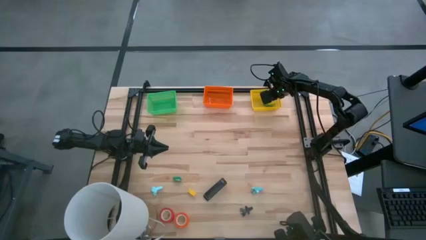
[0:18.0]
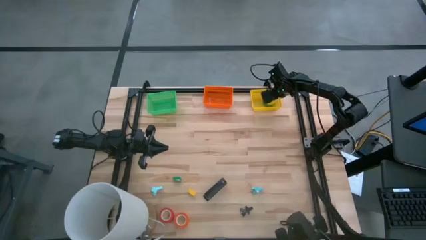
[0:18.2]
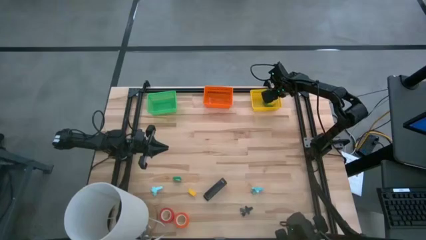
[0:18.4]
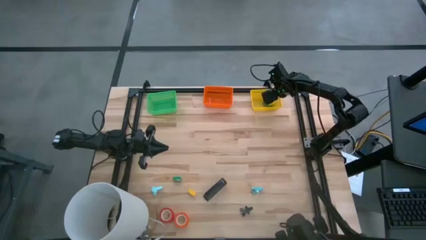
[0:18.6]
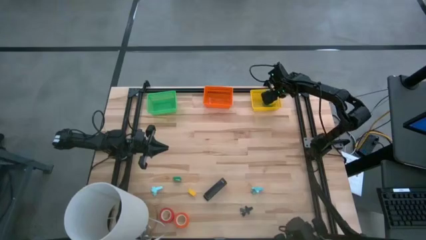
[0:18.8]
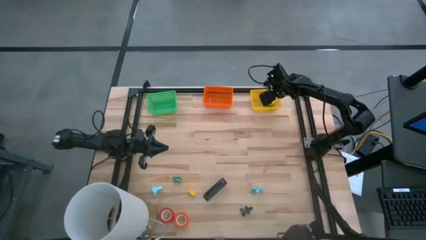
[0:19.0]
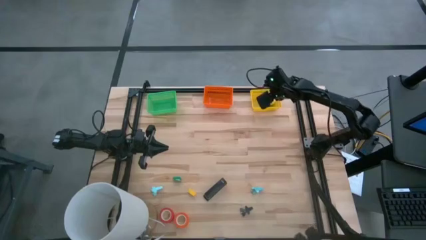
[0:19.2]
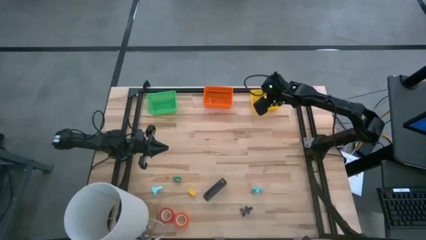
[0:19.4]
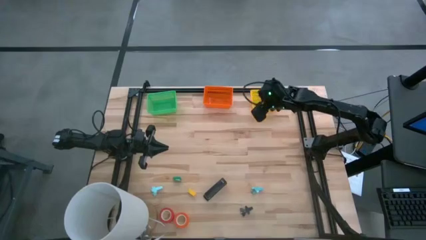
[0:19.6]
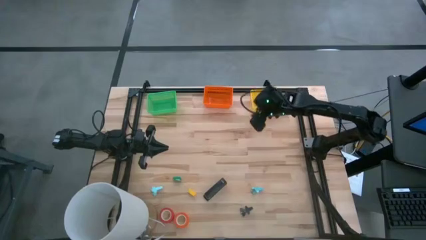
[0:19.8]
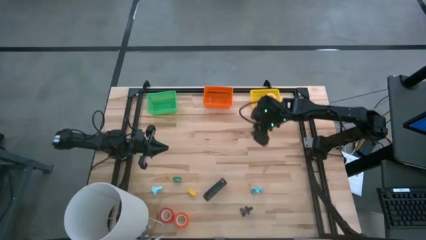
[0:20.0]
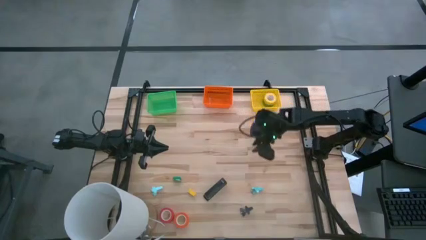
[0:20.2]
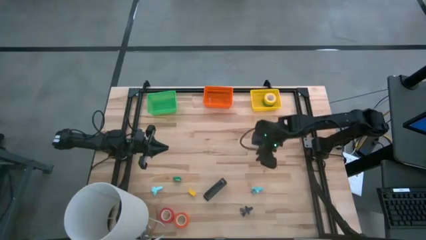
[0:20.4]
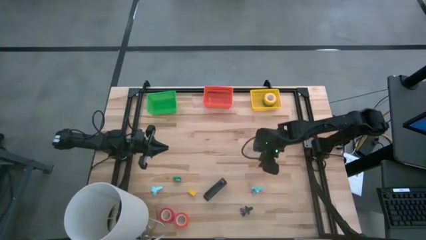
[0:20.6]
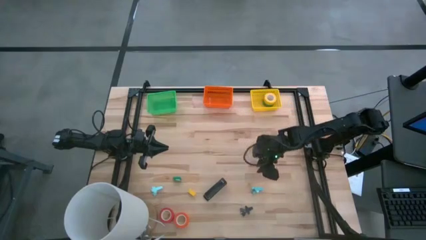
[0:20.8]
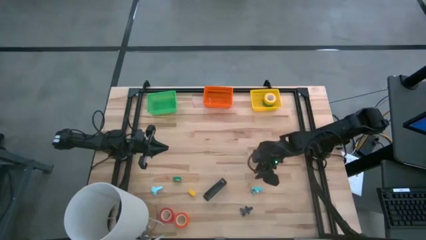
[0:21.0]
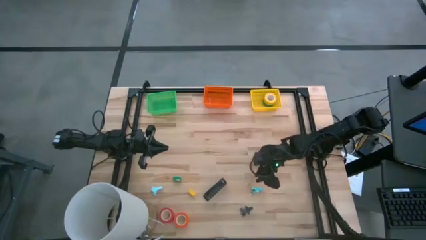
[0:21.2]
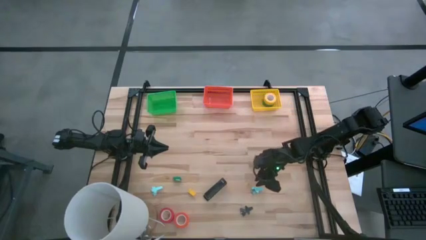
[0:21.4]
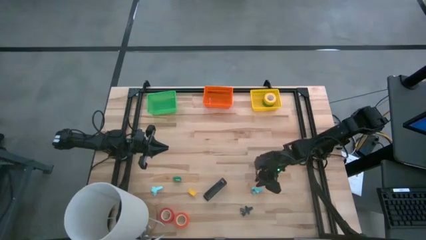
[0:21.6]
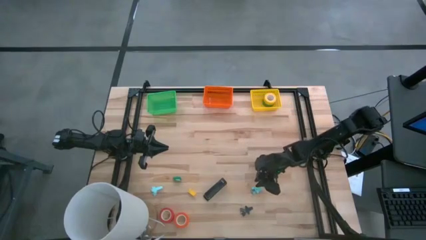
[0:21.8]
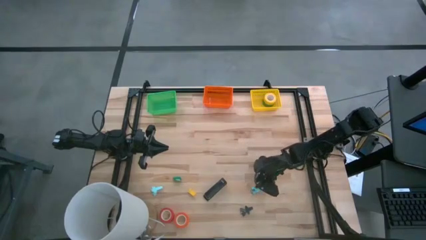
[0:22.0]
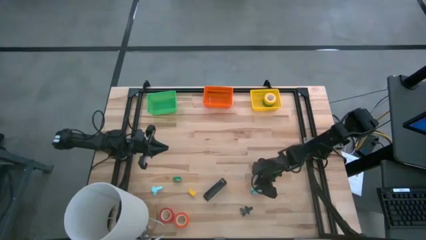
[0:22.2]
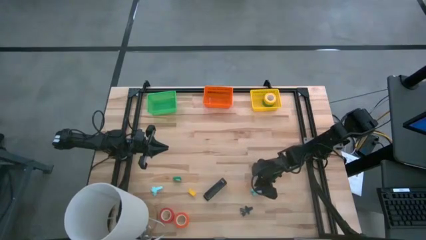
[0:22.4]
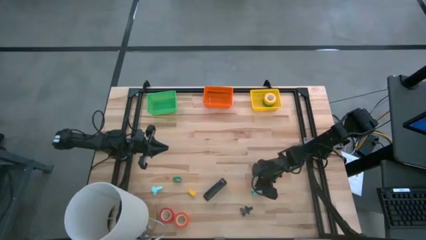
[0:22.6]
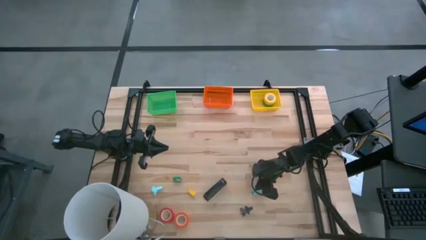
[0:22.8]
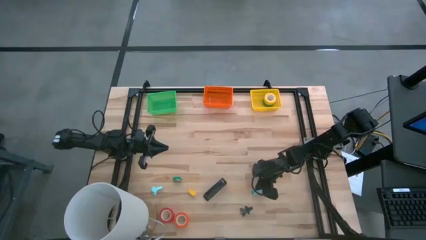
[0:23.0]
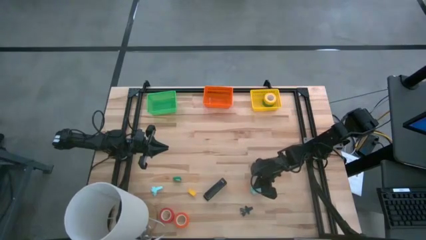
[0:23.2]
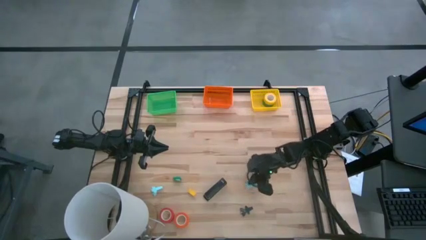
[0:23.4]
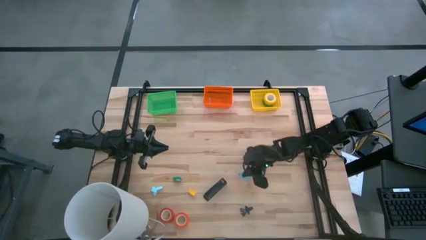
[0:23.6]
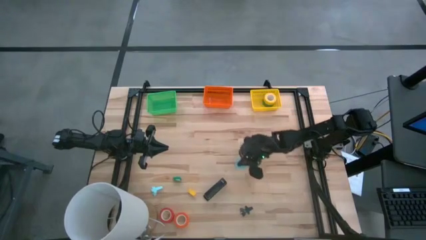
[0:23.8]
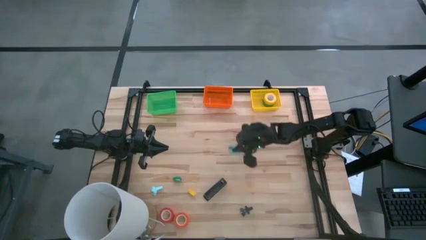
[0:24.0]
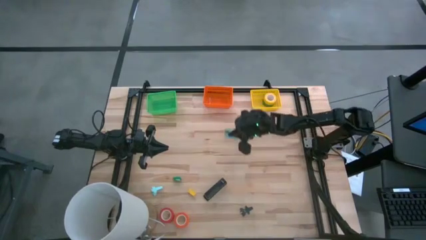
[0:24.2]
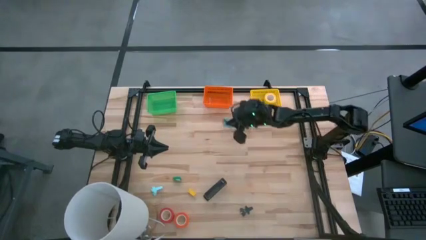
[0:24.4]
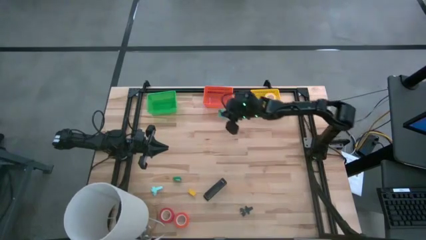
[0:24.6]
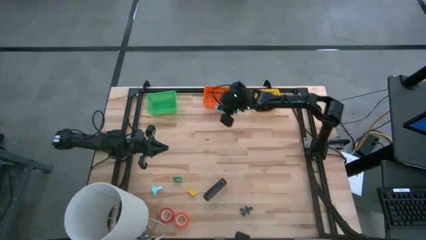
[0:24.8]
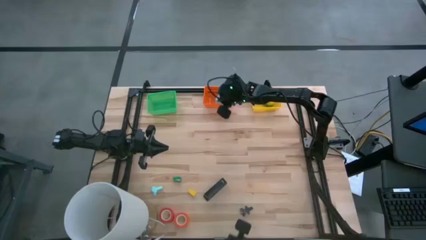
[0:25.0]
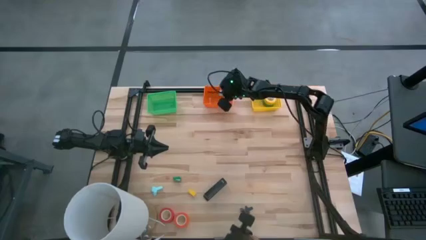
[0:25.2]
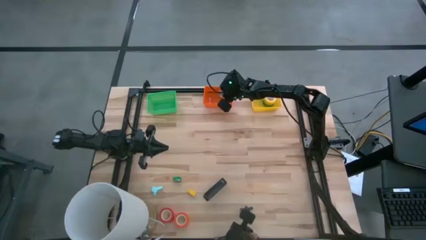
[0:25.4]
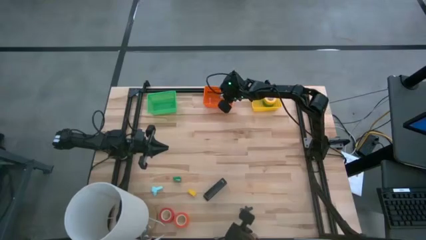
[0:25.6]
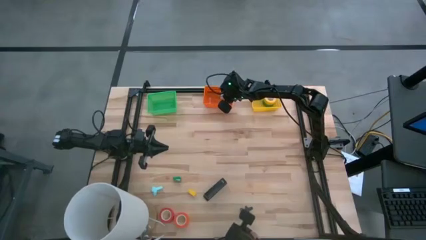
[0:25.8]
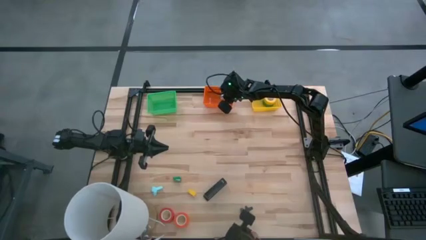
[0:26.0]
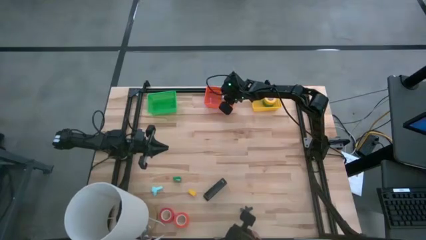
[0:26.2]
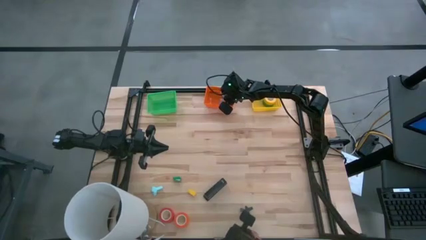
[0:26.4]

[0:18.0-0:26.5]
Task: Pick and place Stapler, Stapler remover, tape
Put the right blue staple remover into the orange bin

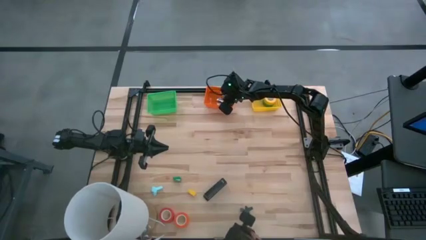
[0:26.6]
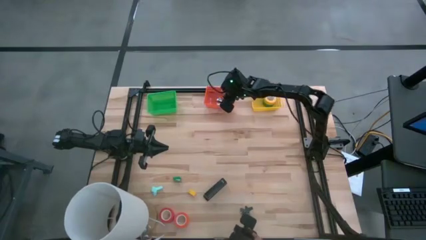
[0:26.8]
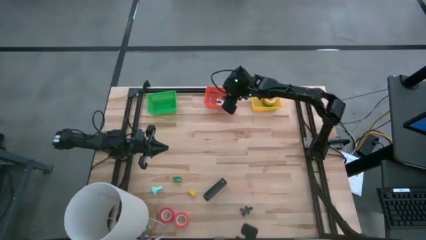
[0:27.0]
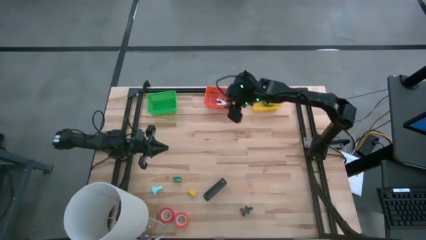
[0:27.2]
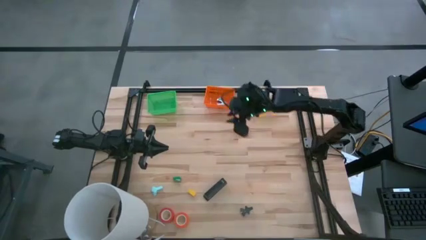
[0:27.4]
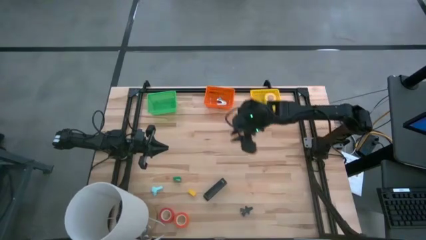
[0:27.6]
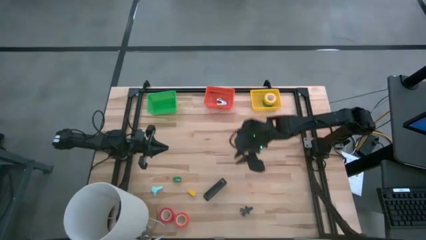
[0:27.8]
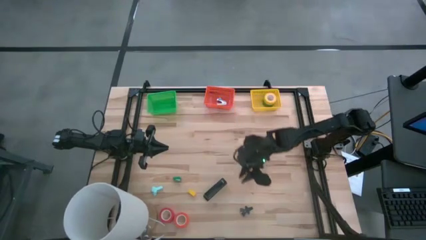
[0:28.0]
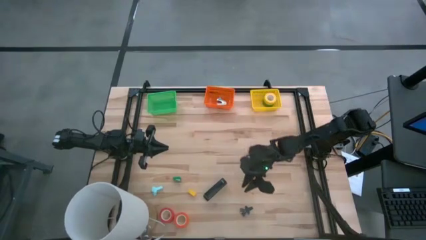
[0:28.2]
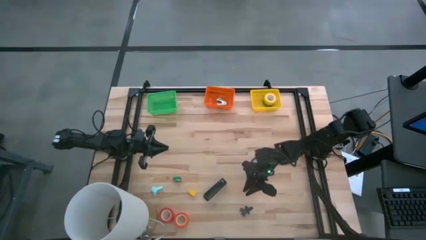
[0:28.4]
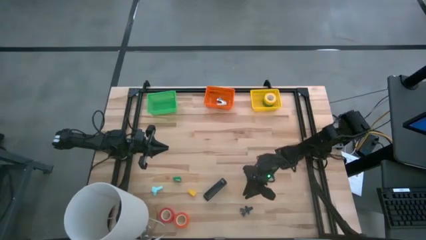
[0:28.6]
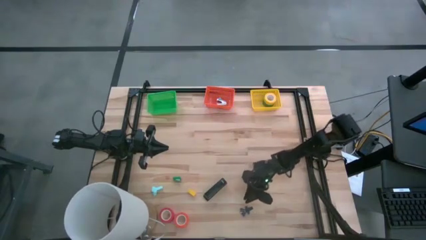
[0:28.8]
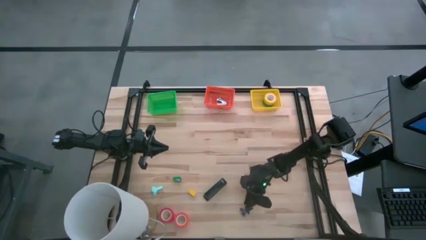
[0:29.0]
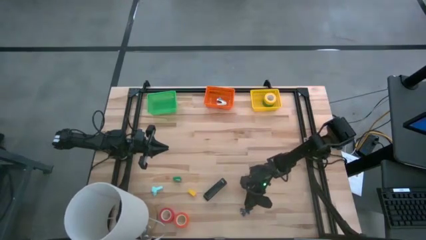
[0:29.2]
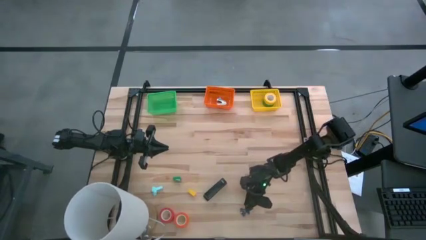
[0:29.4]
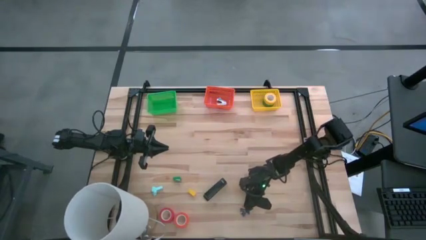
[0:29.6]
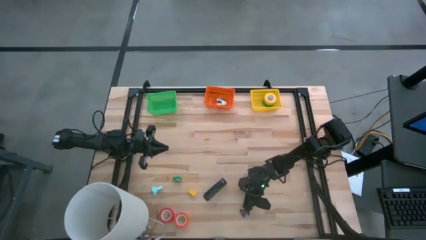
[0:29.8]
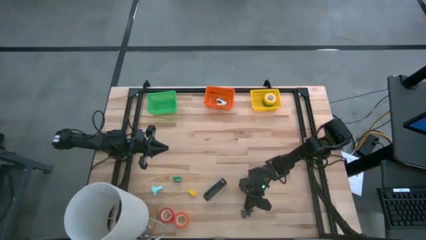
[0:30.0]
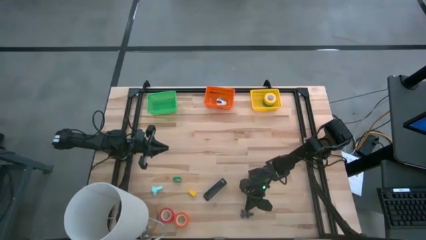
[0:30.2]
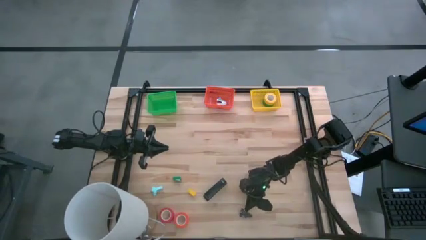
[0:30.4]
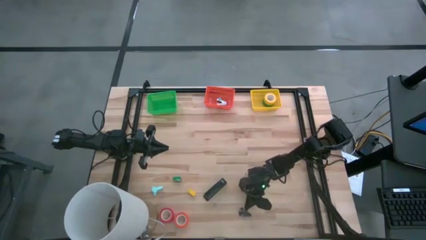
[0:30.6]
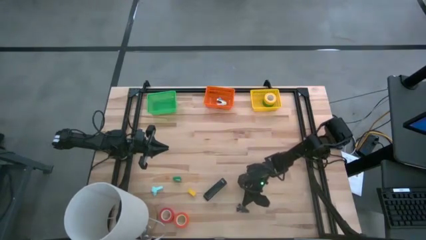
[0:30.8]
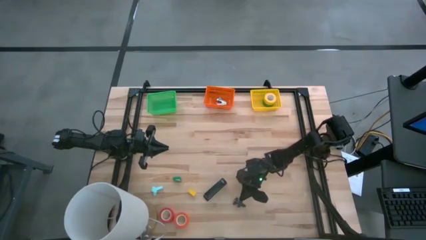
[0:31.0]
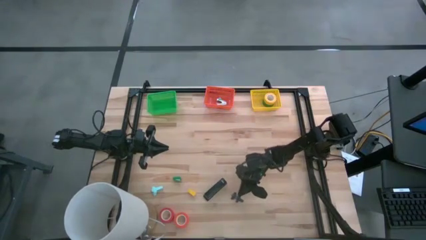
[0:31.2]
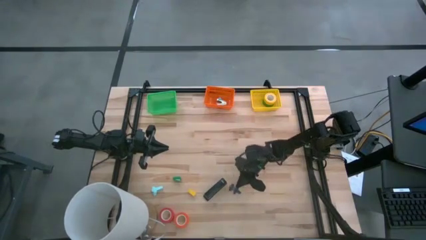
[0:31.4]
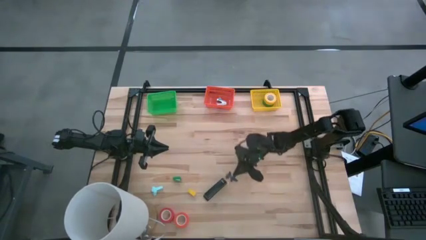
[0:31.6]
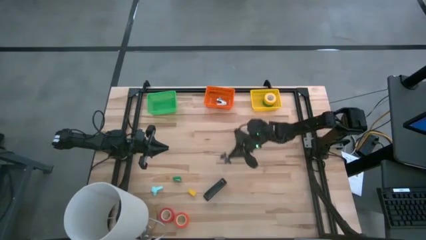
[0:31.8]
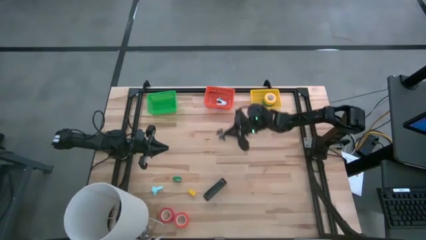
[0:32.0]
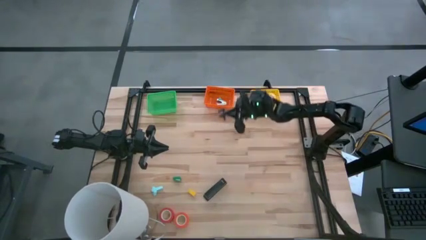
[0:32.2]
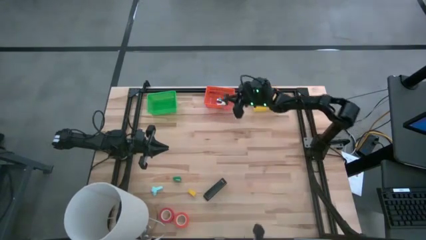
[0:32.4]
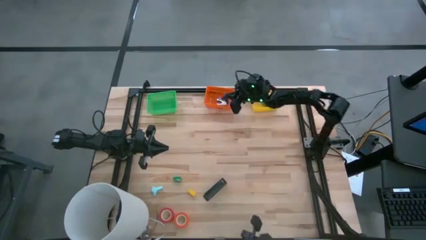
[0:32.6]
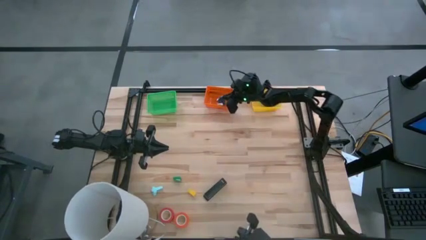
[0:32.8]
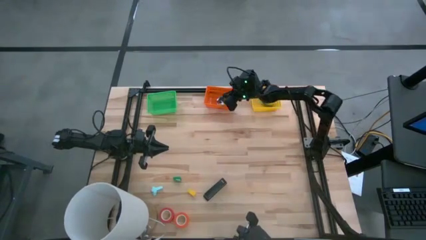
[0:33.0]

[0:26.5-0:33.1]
Put the gray staple remover into the orange bin

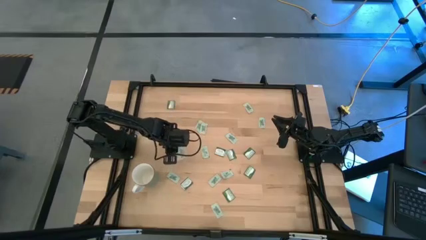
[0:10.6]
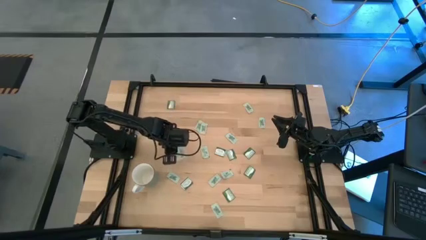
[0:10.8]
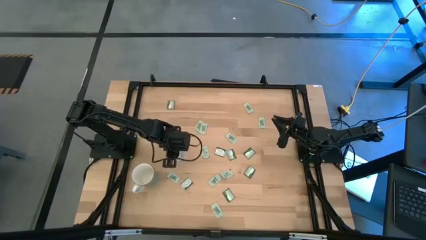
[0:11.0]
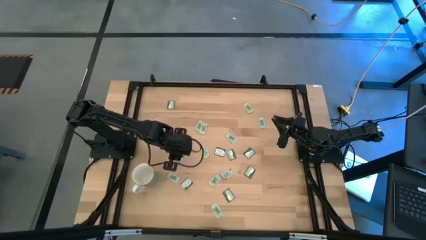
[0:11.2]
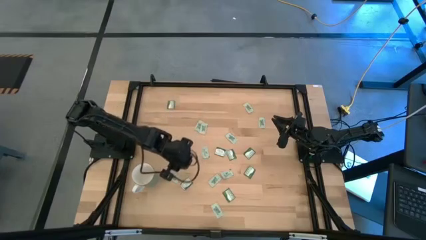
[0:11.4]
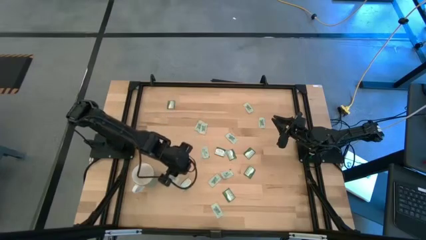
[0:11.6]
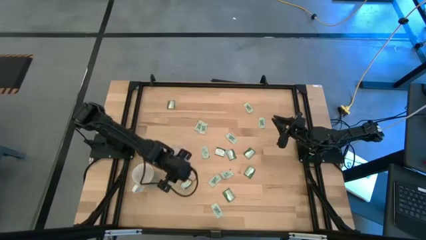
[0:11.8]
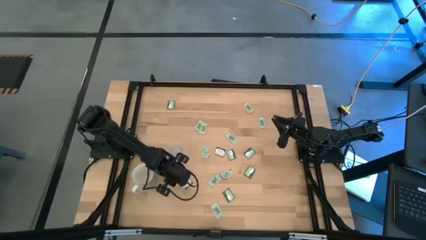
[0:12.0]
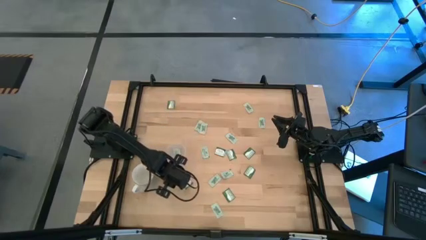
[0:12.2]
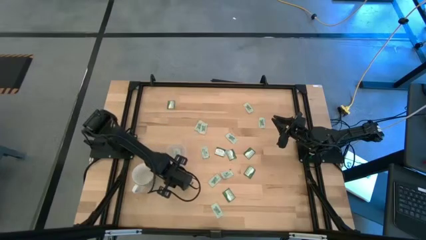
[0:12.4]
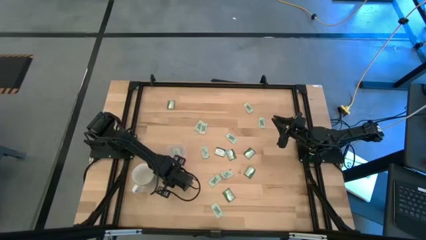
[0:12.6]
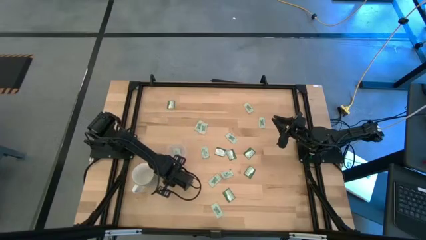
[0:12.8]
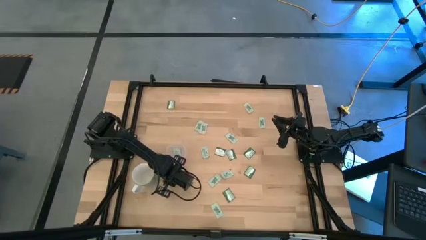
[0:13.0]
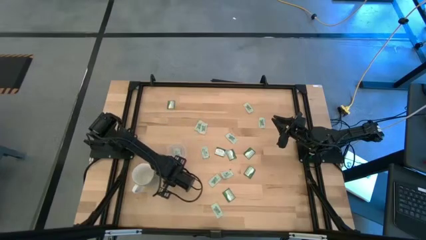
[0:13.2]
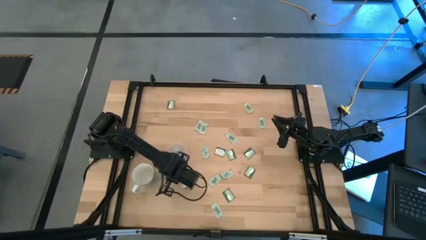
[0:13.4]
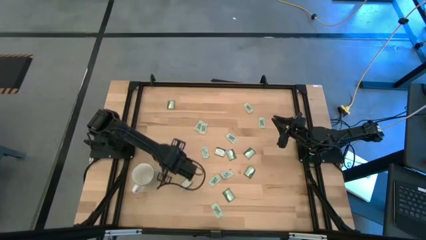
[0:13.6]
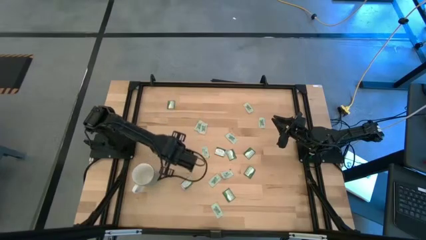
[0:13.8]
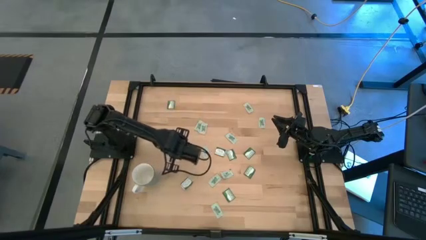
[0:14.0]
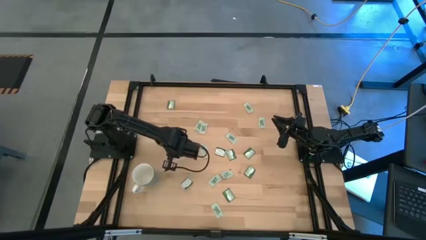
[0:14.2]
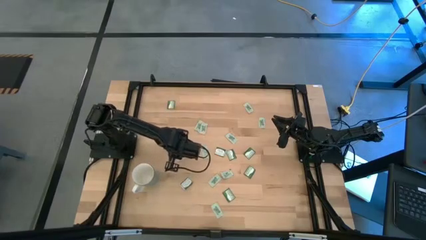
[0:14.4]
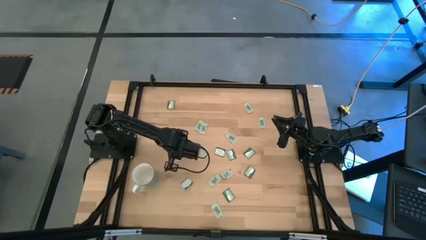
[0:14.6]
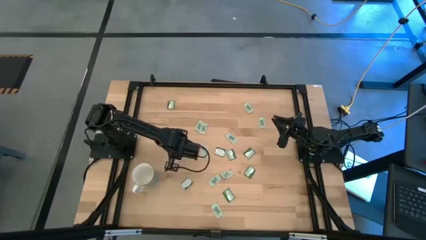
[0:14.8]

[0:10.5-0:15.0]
Task: Pick and place Stevia / Truvia into bins
Put the green stevia packet into the transparent container
